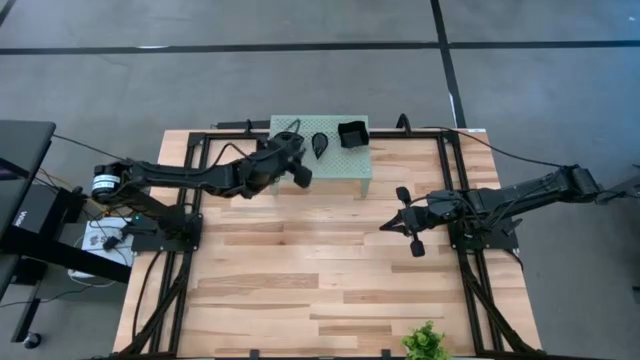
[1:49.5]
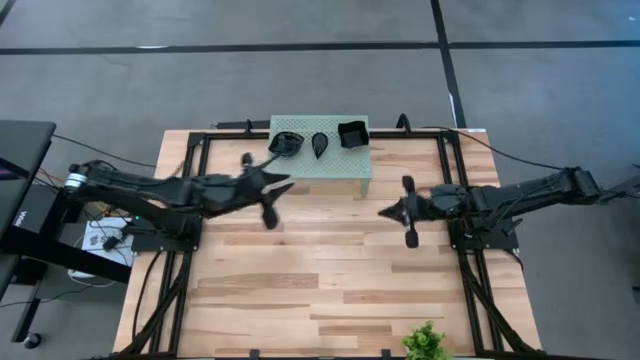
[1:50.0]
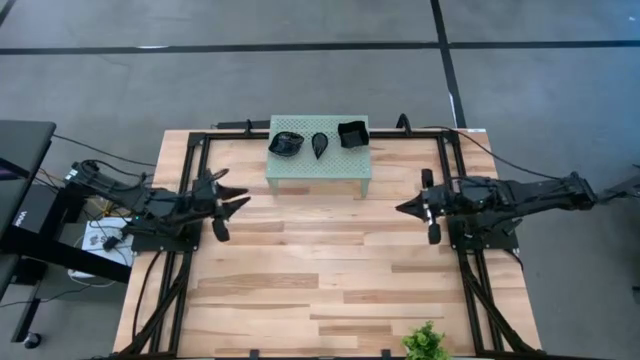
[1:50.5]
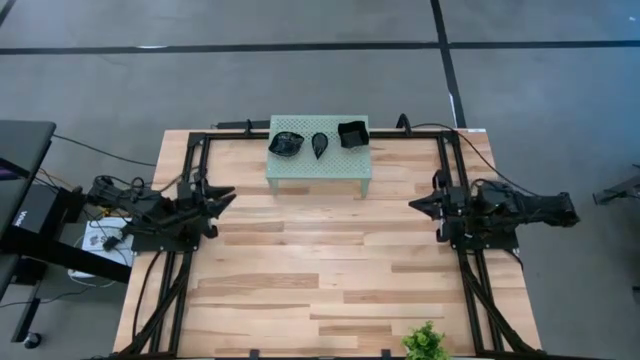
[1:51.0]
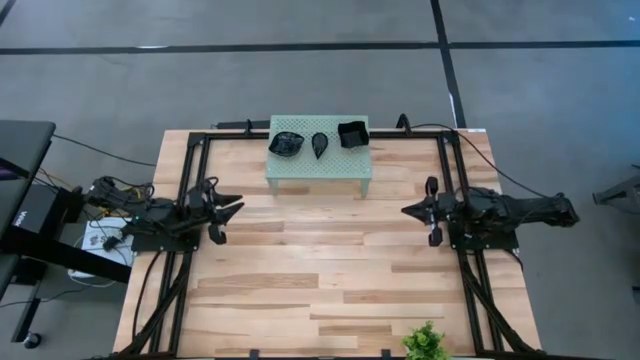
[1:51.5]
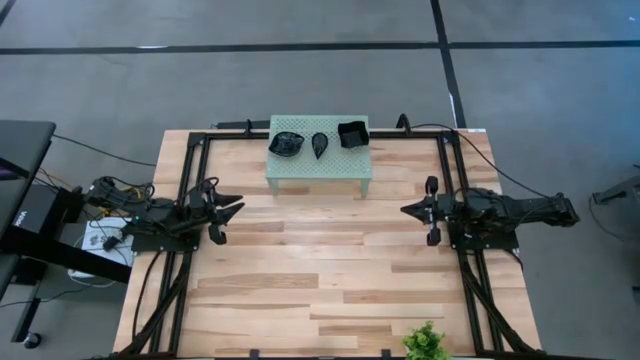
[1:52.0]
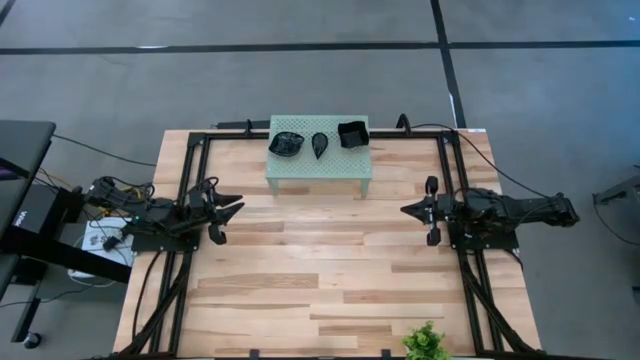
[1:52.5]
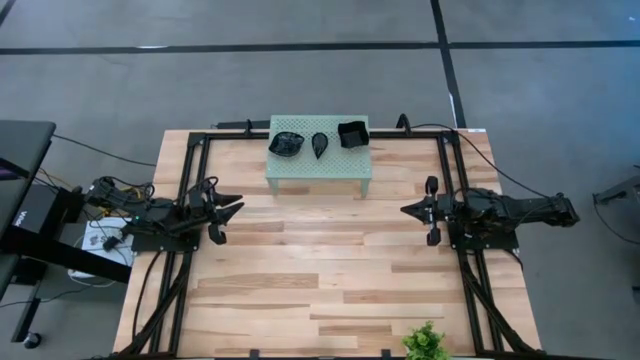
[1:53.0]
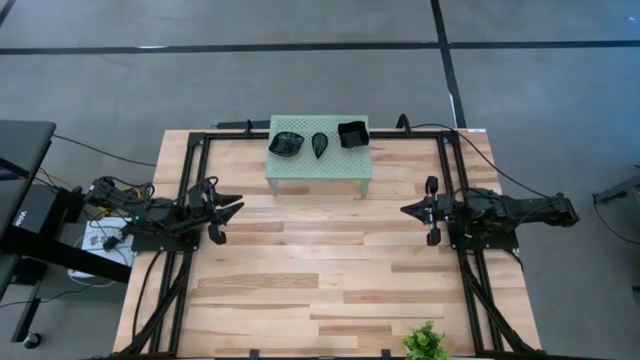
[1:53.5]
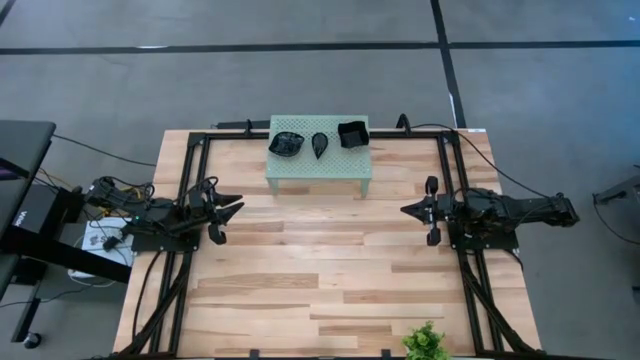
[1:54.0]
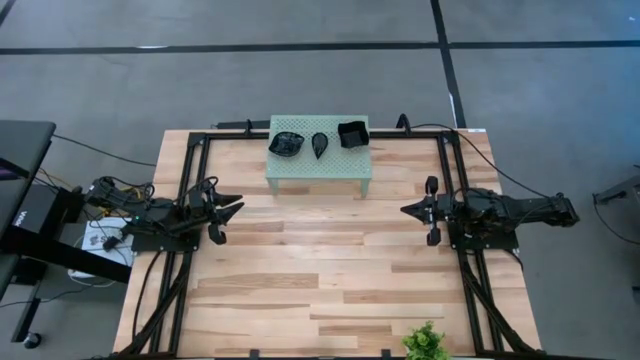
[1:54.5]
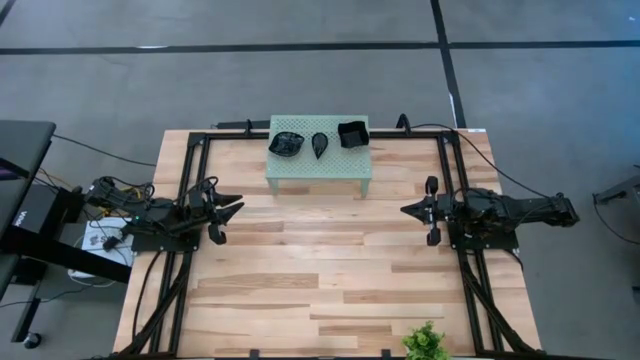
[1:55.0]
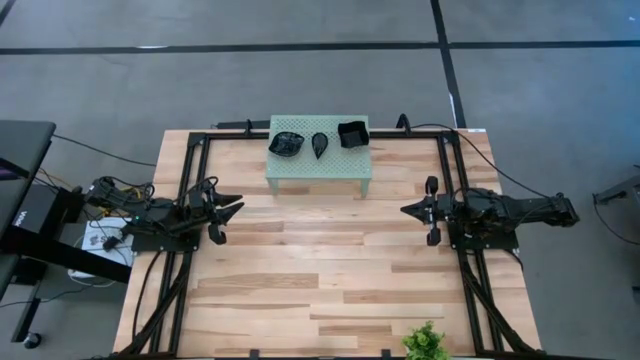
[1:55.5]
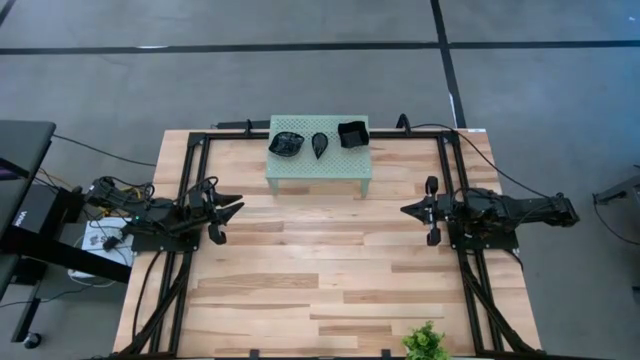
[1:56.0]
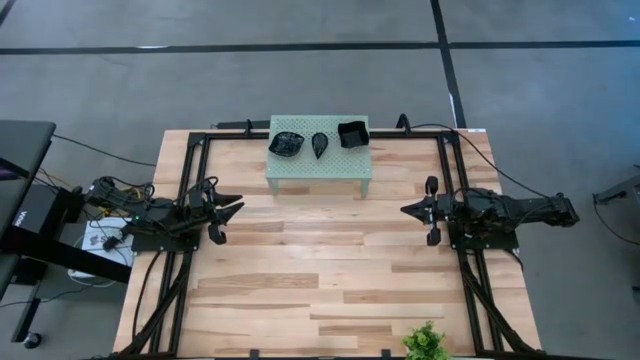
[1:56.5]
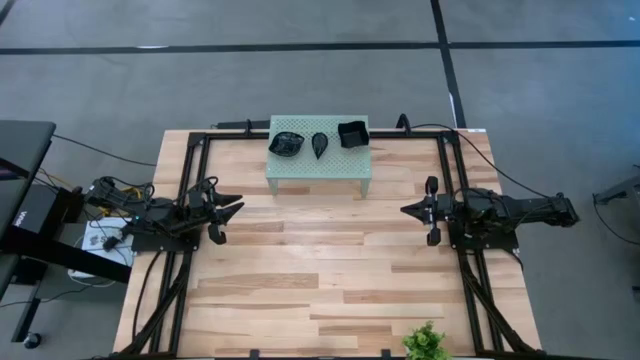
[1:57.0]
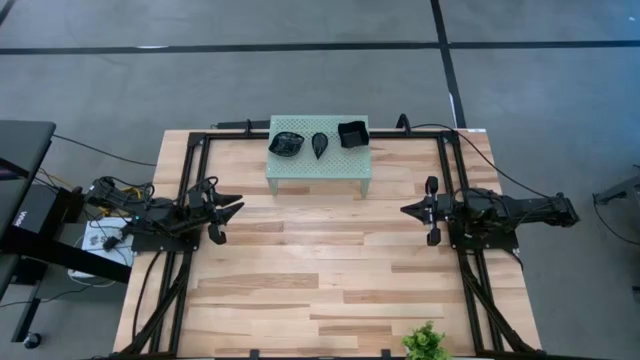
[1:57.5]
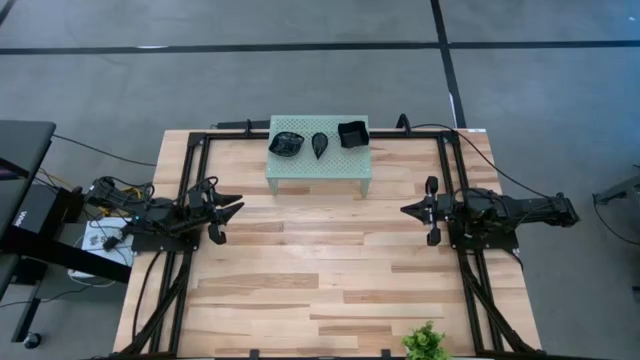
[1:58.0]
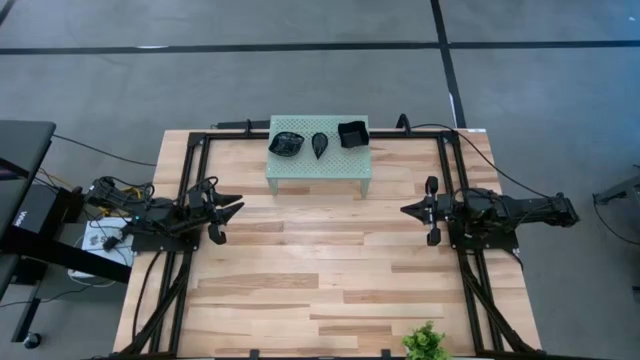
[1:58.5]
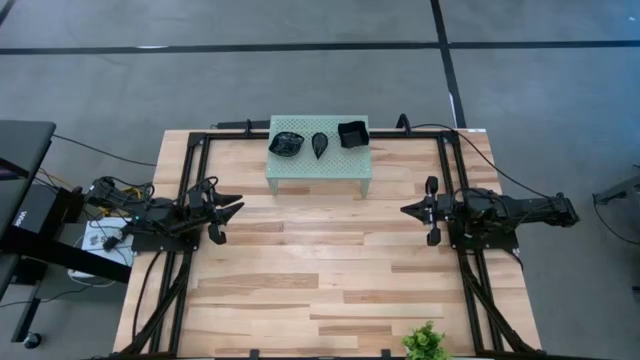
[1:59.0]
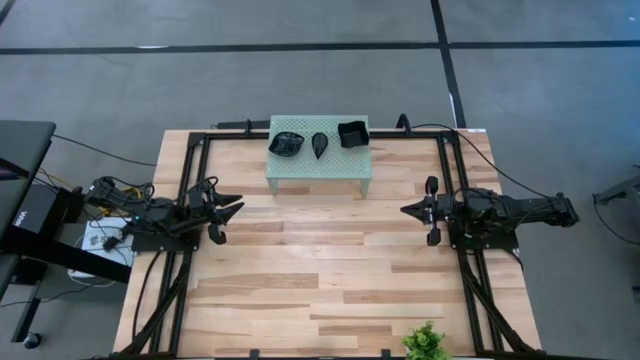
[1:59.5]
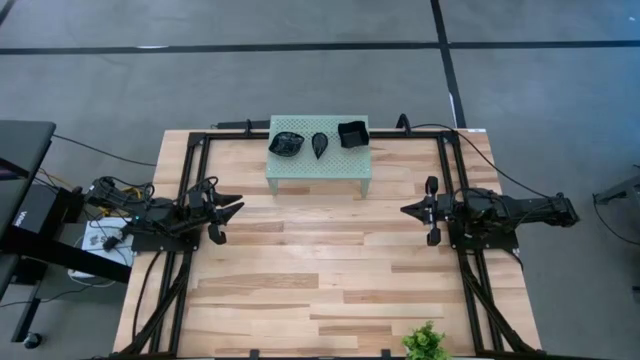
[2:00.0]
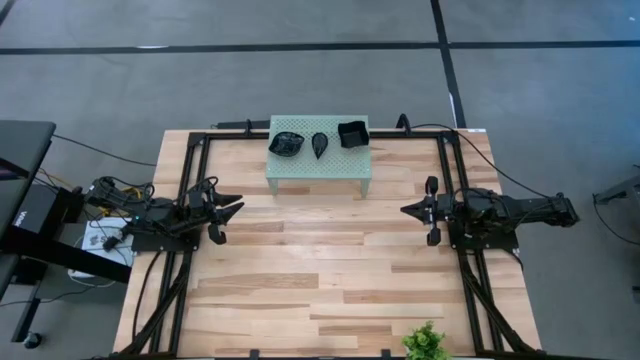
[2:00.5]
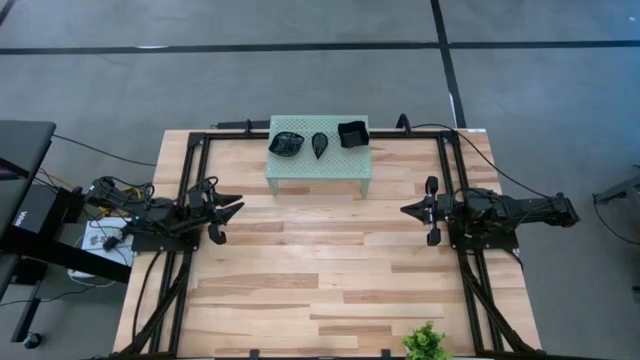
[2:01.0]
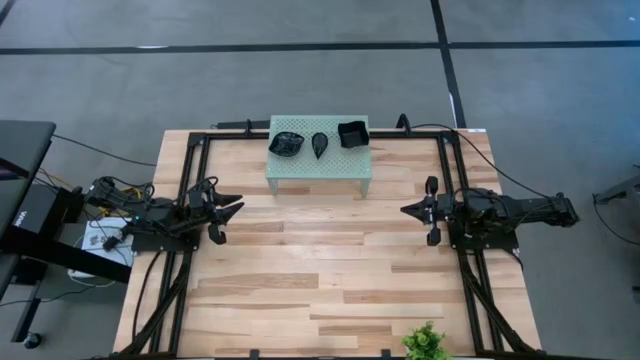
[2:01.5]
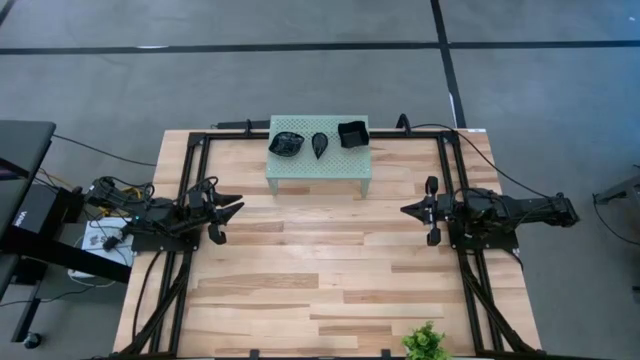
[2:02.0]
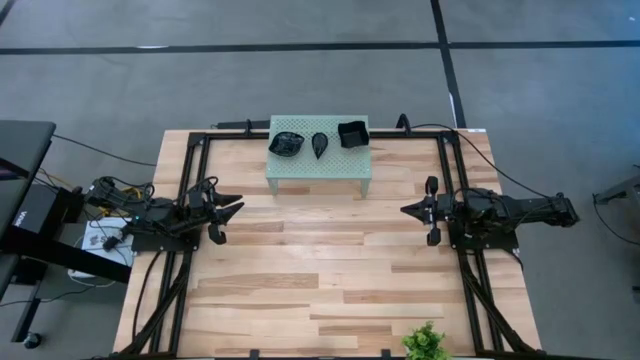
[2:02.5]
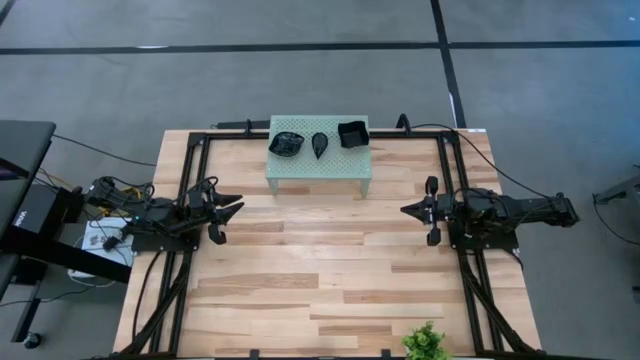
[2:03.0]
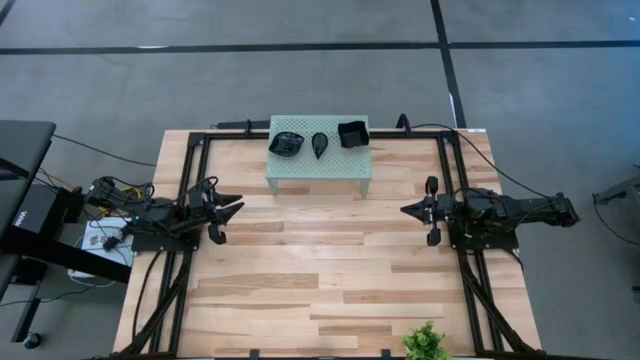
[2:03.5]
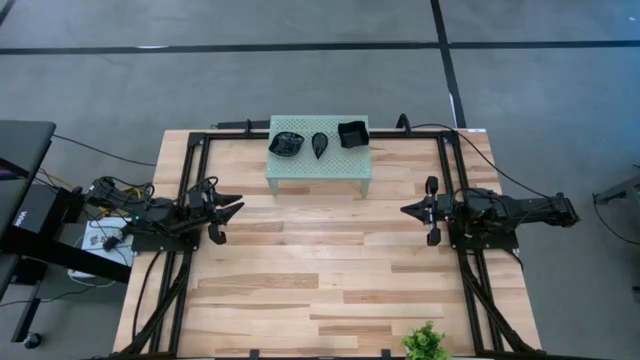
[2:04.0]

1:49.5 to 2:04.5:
Task: Pick & Place Mini shaped plates
Return to Home Position

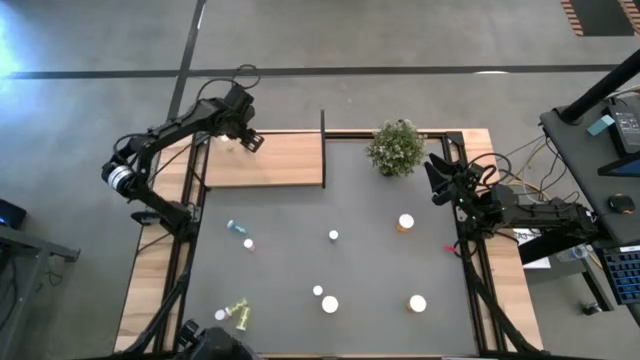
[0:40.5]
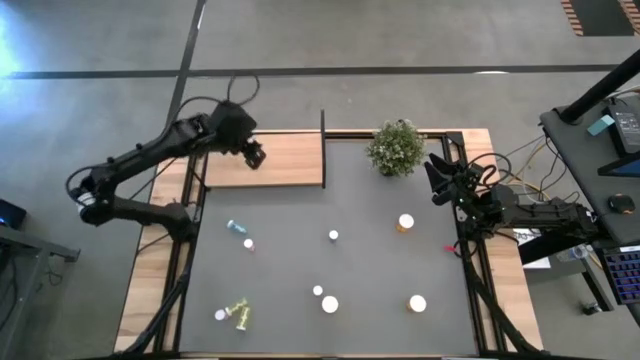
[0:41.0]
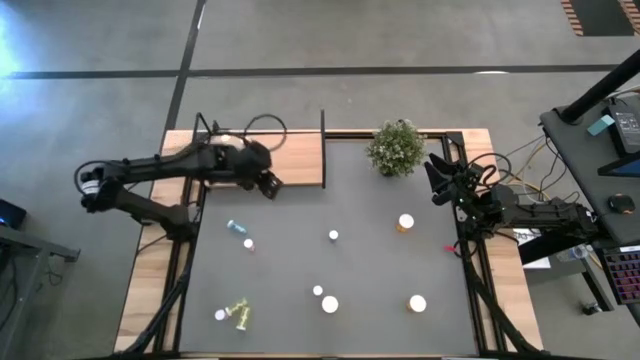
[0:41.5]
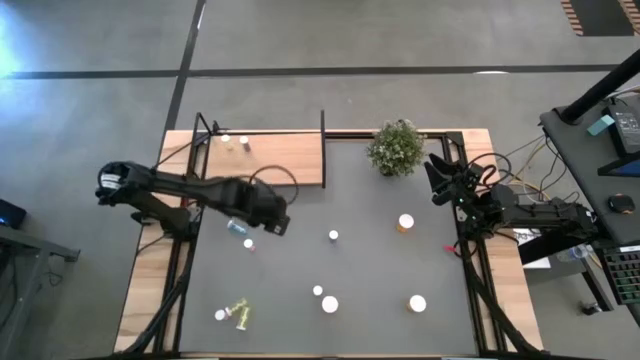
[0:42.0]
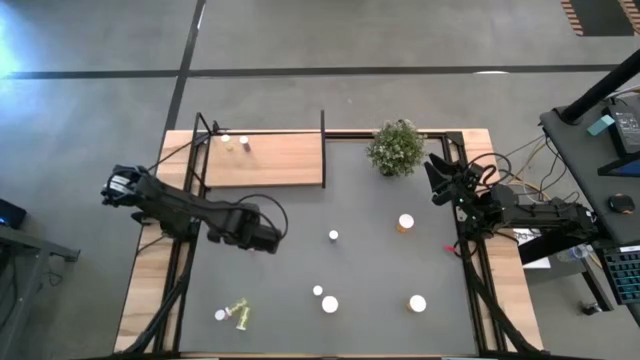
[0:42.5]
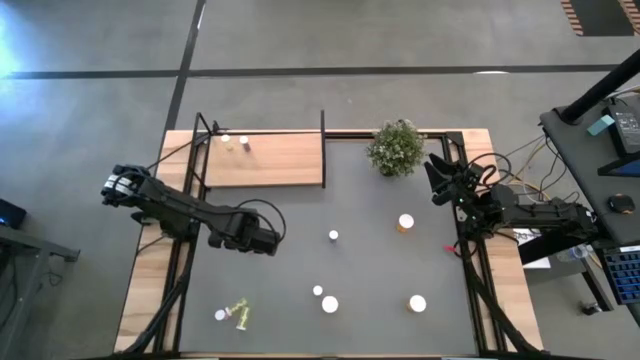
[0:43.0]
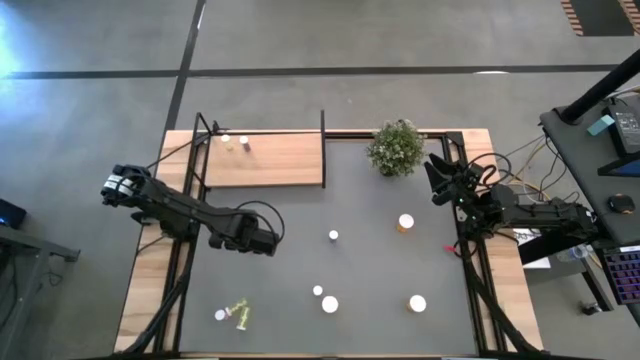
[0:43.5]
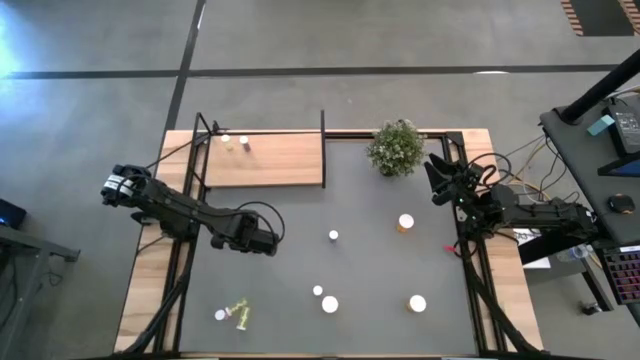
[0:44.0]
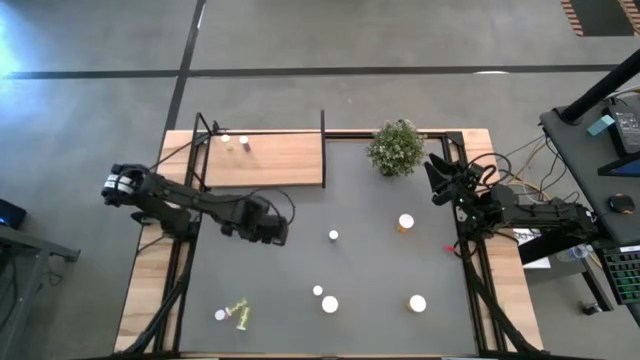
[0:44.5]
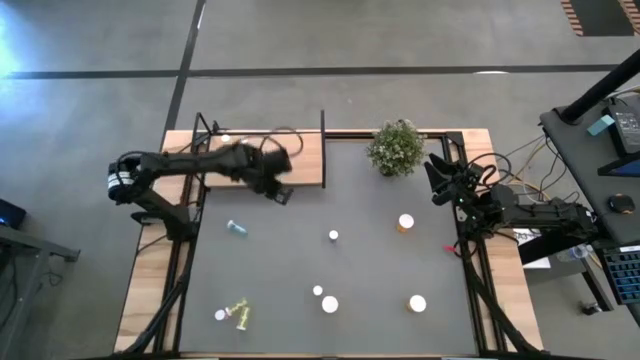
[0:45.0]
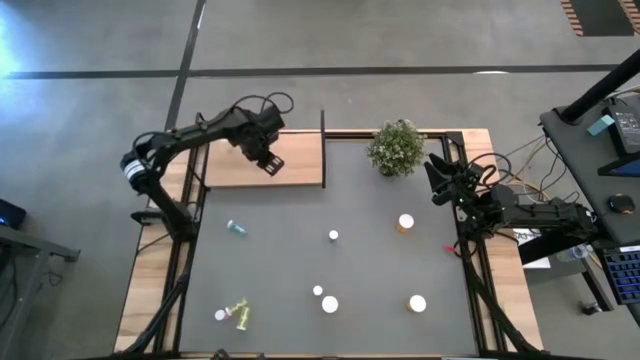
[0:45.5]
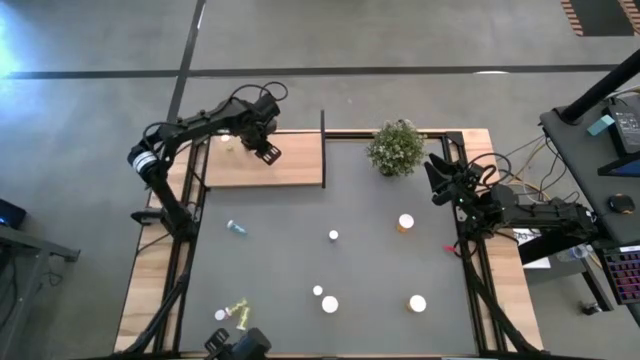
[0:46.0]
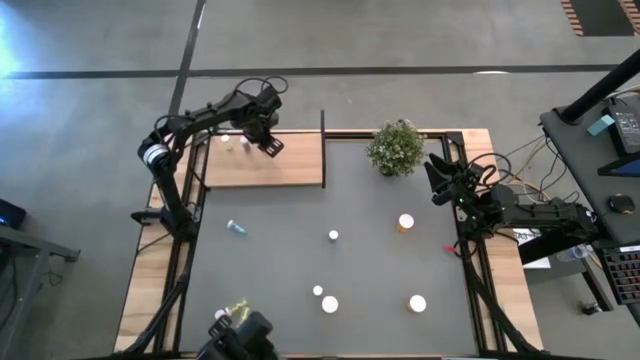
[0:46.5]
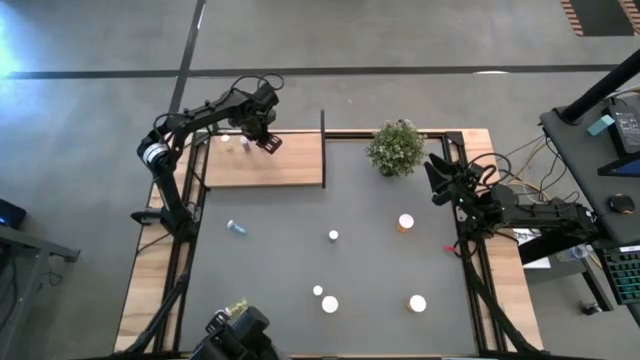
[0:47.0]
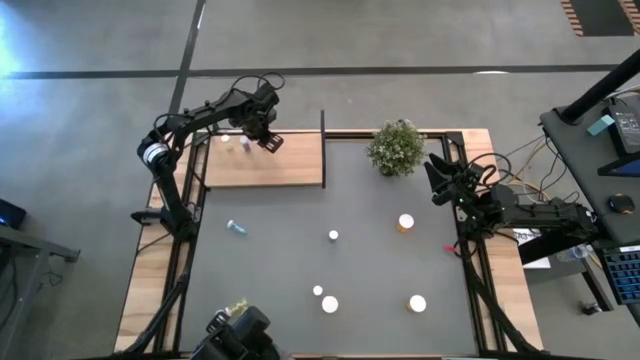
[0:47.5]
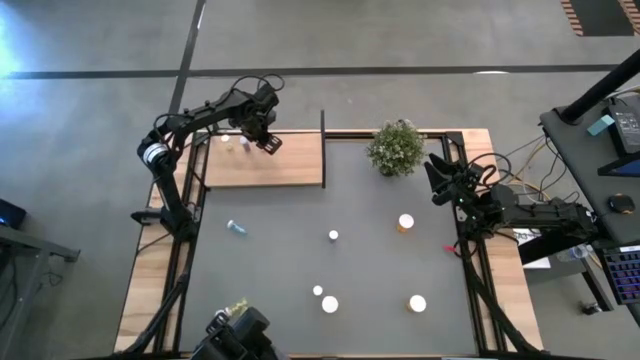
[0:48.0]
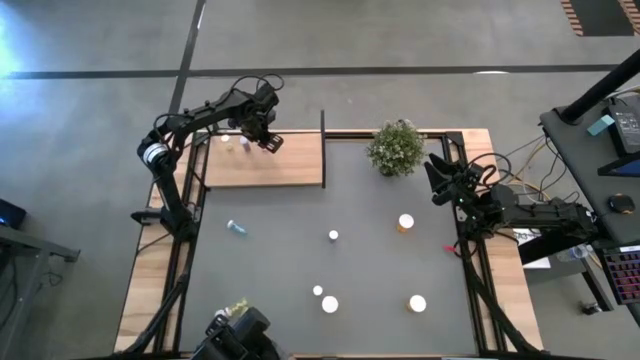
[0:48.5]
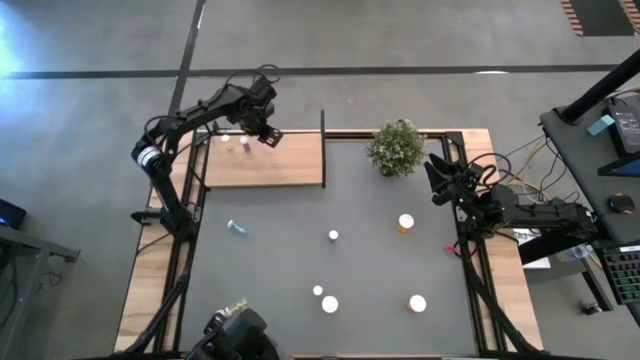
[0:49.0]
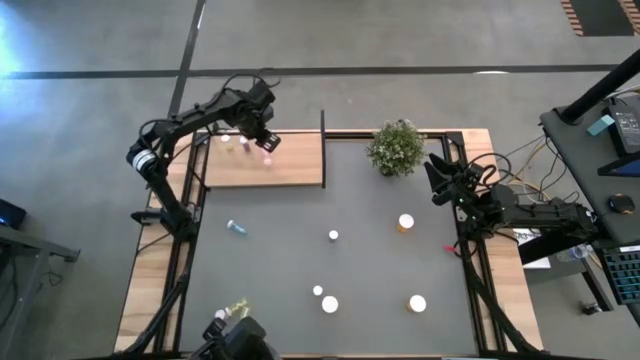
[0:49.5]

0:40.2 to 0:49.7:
Task: Pick and place medicine bottles onto shelf by color
Put the top pink pill bottle on the shelf
